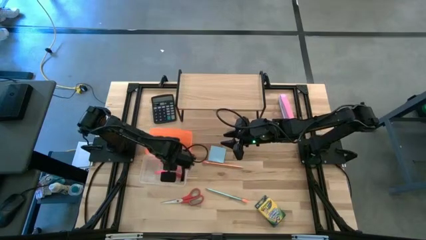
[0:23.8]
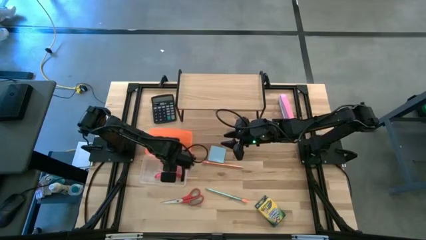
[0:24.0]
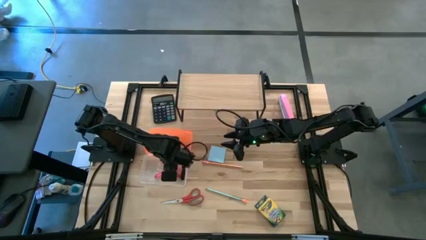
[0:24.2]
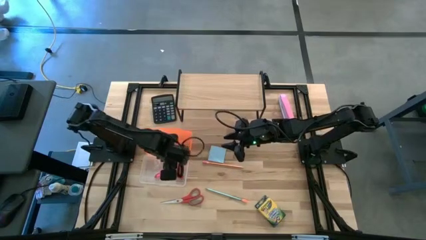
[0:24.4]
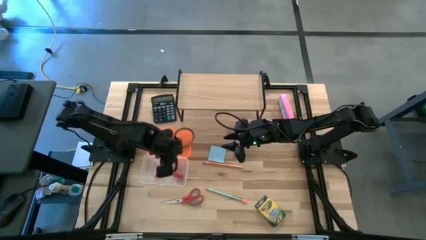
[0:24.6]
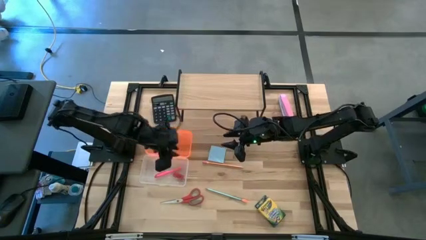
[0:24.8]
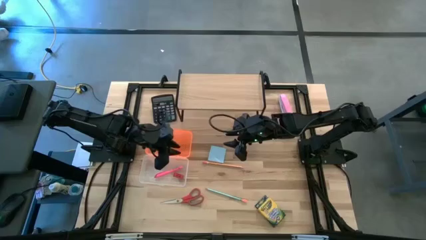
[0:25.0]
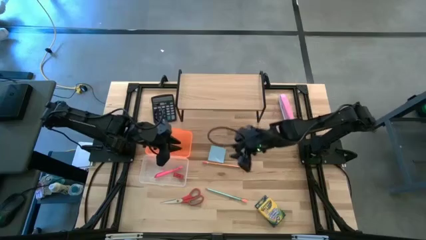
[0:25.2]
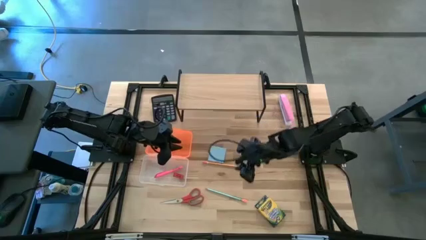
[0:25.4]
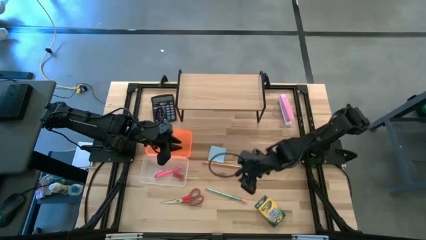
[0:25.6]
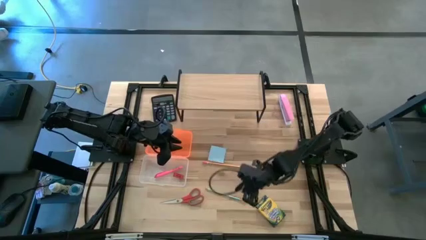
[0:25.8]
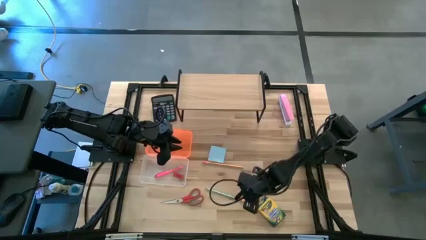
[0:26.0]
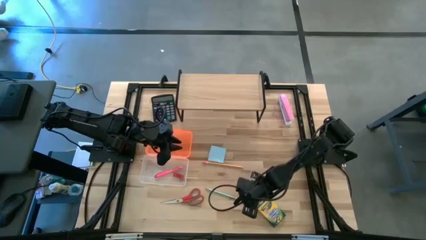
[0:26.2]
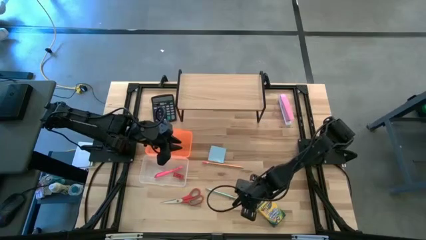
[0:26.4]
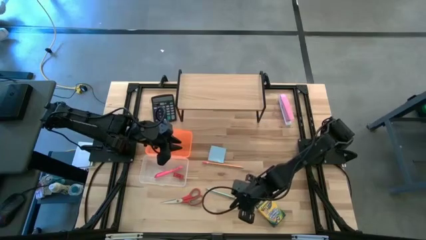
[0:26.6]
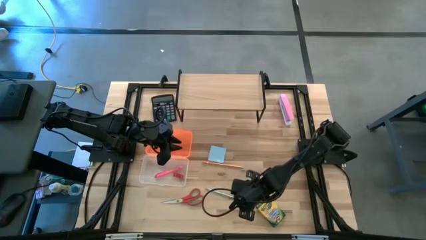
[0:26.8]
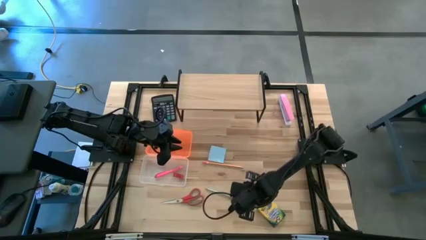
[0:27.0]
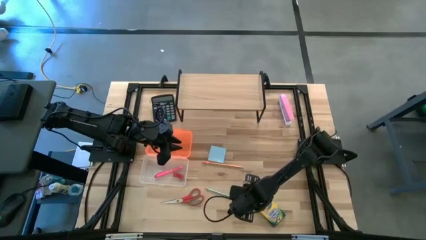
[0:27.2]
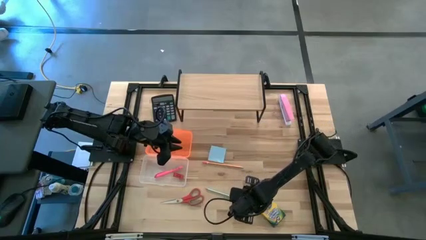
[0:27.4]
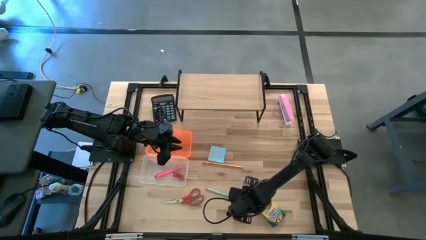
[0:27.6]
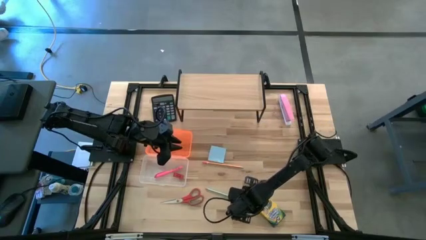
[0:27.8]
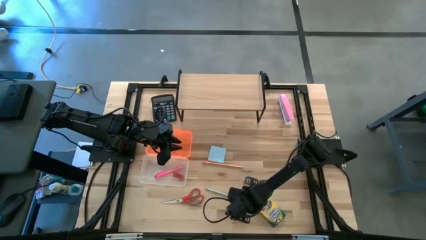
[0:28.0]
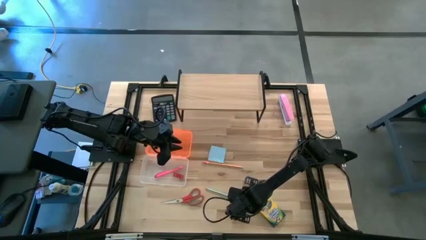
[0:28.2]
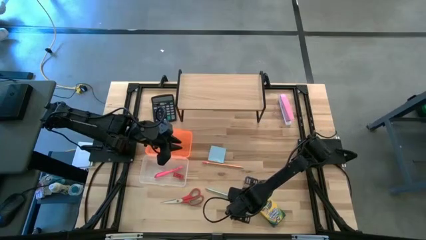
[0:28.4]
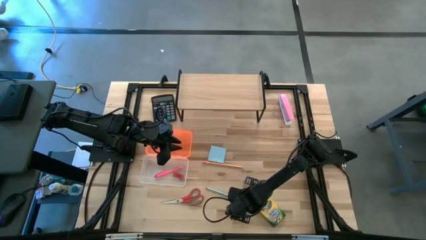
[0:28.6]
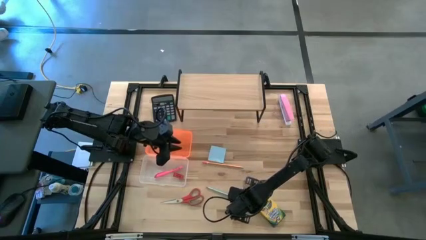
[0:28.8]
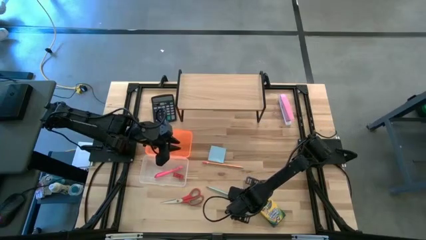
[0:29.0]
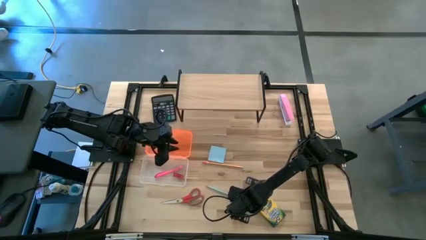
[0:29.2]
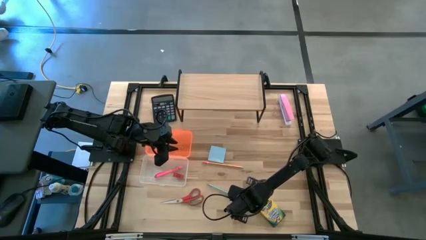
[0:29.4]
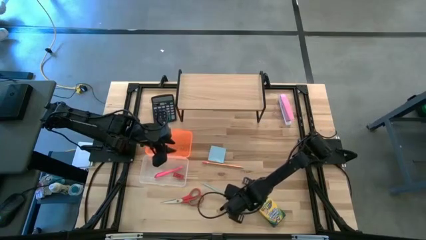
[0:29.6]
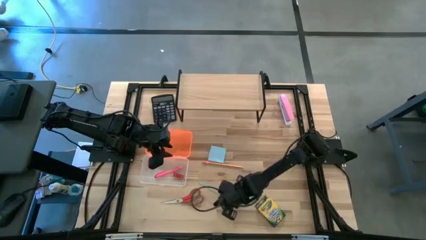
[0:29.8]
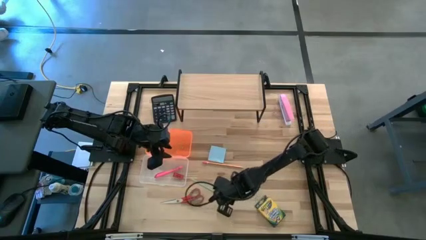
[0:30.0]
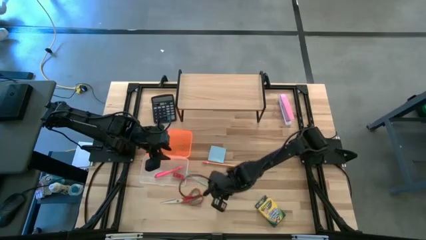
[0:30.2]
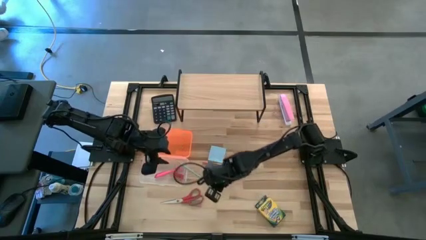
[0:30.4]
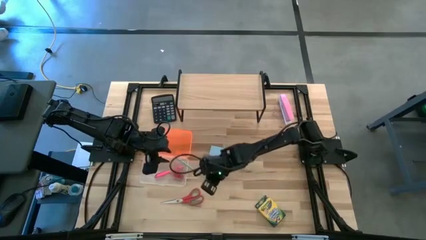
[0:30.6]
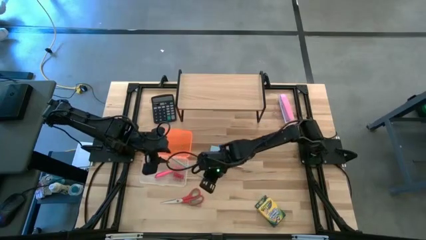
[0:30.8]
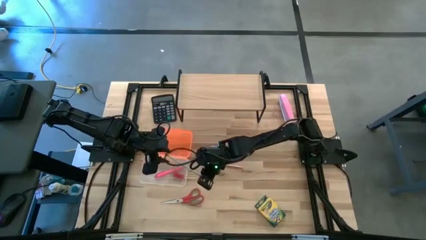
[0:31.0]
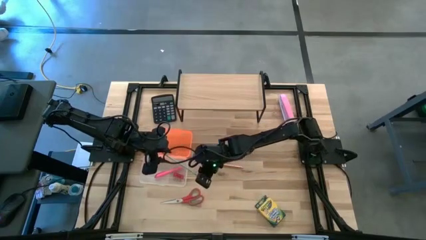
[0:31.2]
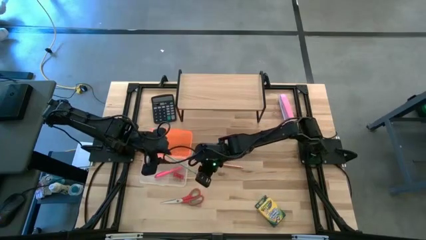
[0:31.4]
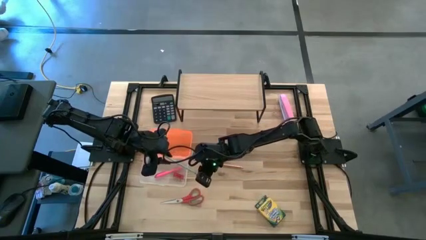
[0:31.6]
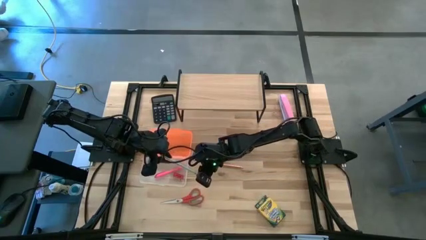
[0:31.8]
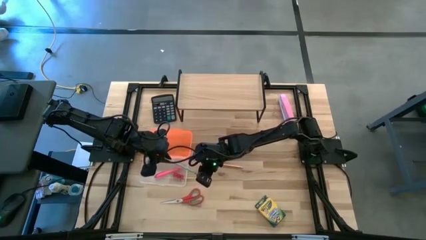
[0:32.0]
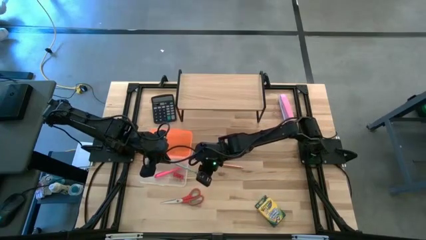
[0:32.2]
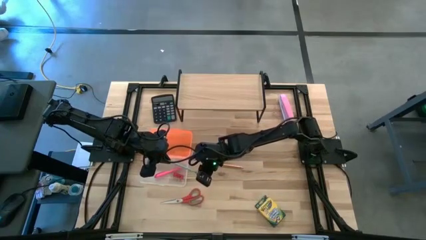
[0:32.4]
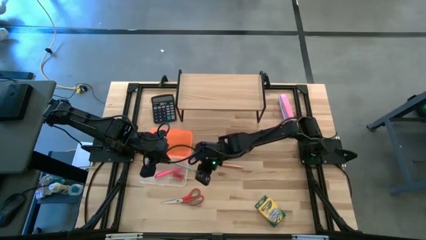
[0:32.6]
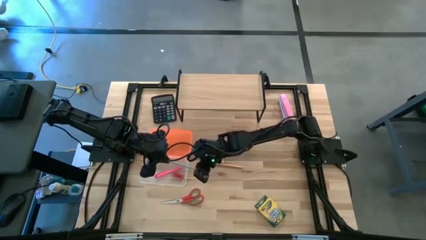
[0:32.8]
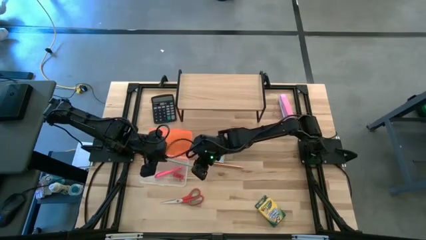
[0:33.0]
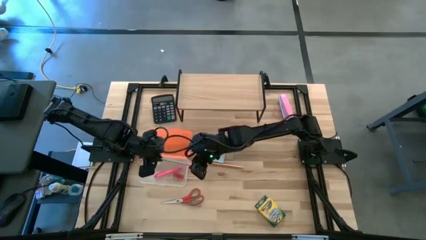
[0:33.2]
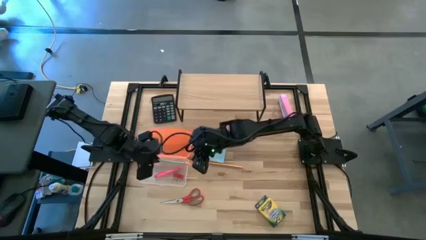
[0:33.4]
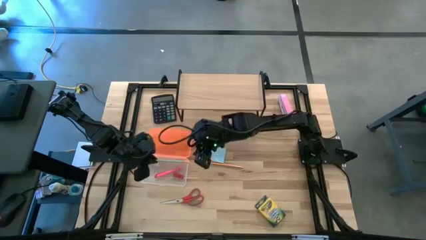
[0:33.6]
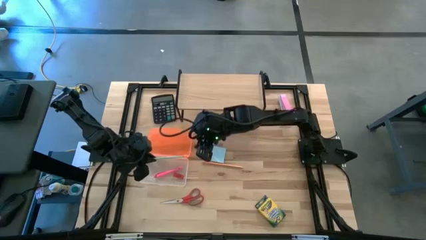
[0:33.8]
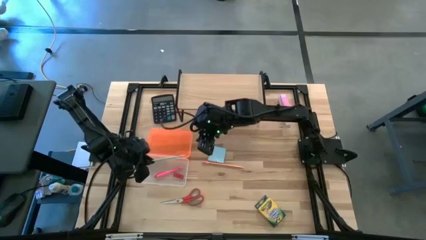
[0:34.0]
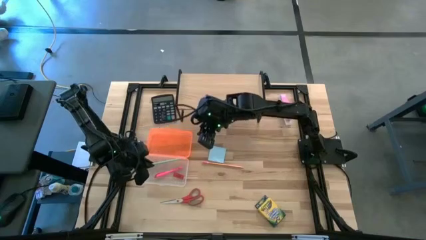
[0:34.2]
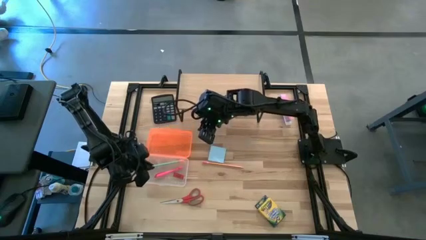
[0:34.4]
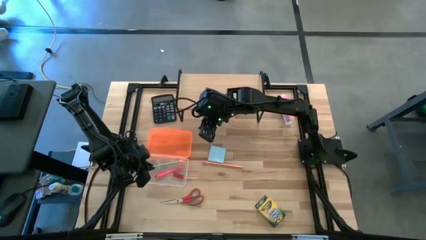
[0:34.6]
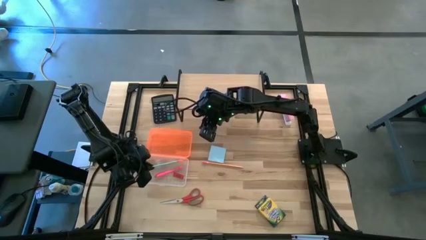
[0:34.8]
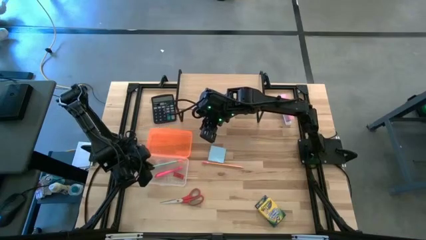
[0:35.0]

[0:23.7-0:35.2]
Task: Pack school essentials
Put the blue pencil into the supply box

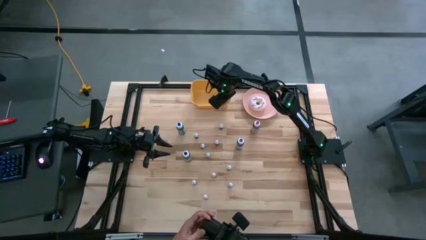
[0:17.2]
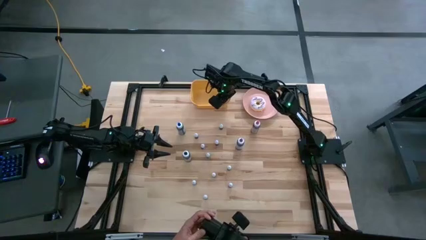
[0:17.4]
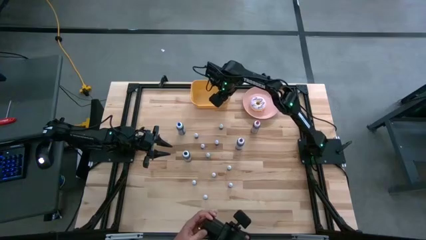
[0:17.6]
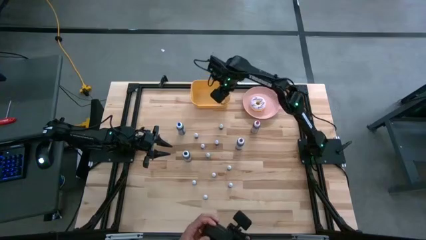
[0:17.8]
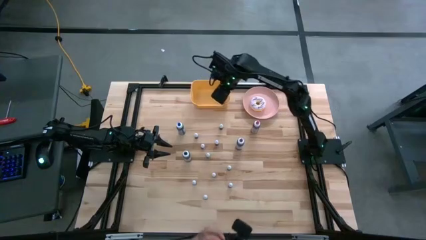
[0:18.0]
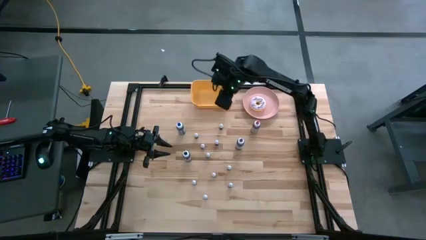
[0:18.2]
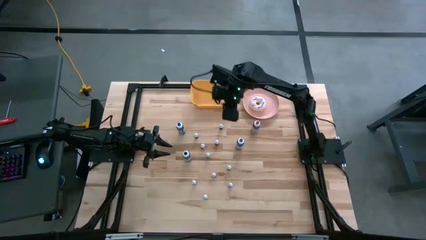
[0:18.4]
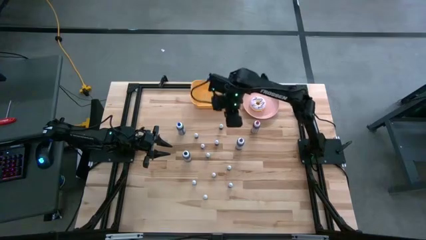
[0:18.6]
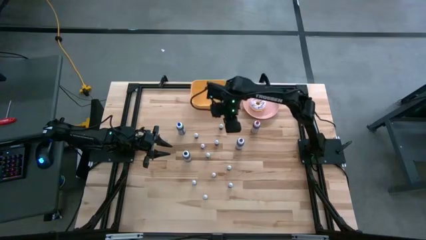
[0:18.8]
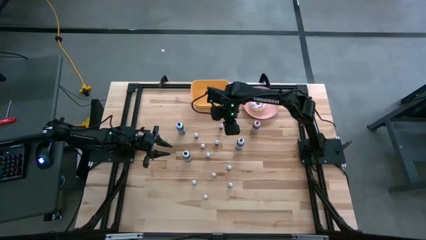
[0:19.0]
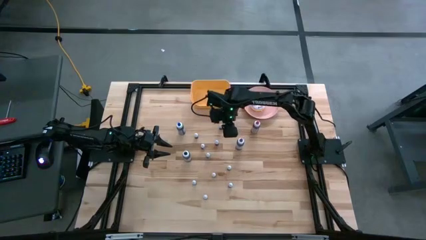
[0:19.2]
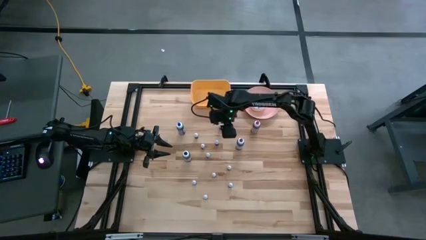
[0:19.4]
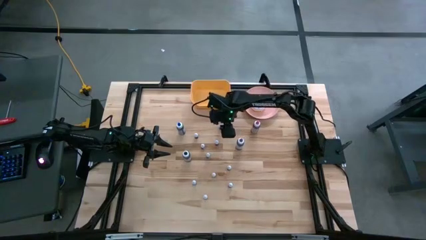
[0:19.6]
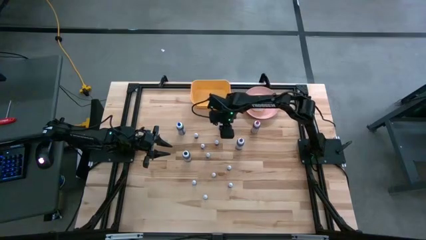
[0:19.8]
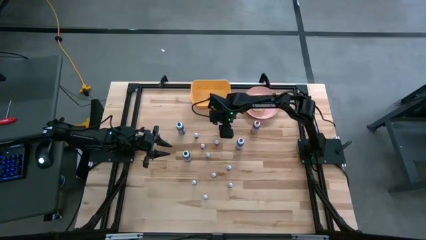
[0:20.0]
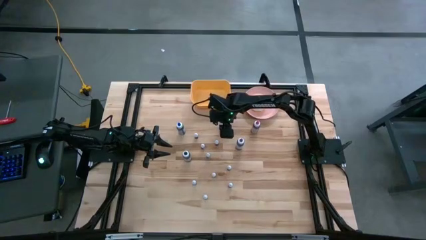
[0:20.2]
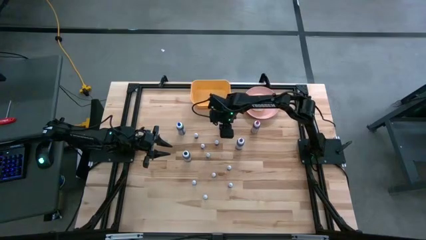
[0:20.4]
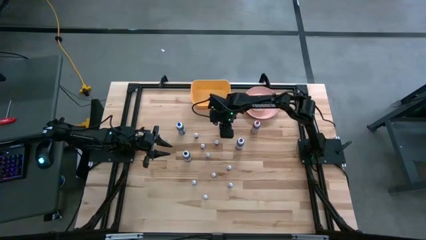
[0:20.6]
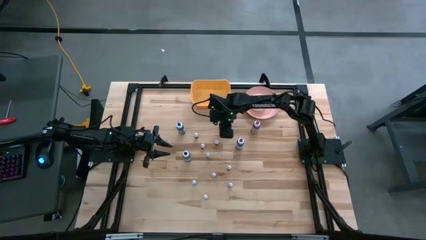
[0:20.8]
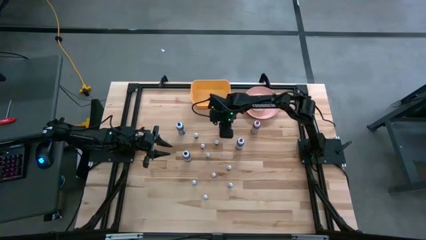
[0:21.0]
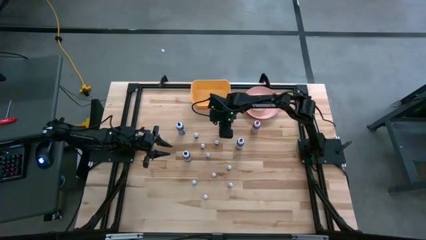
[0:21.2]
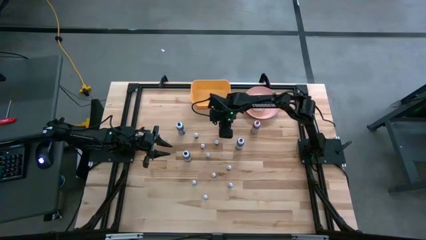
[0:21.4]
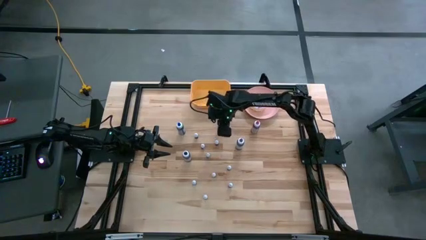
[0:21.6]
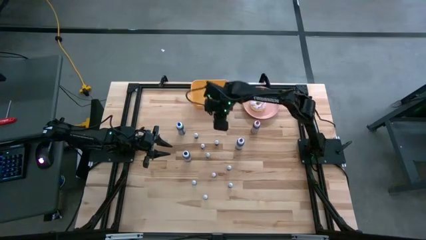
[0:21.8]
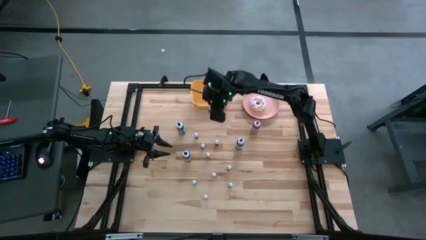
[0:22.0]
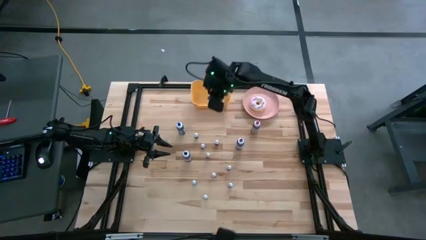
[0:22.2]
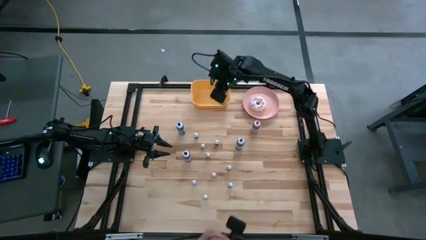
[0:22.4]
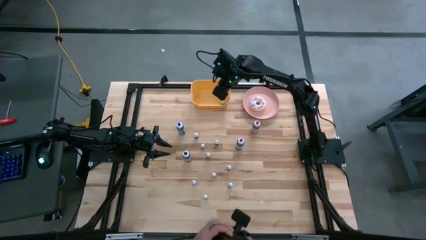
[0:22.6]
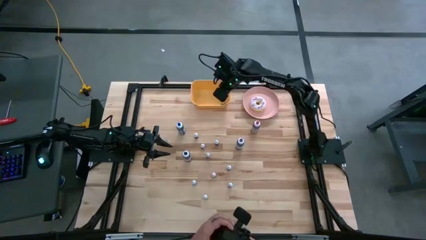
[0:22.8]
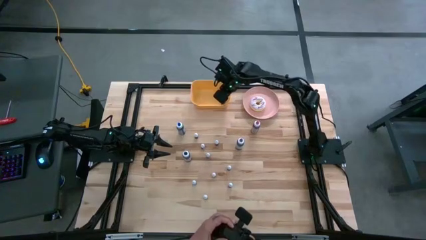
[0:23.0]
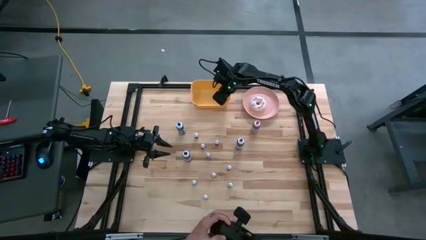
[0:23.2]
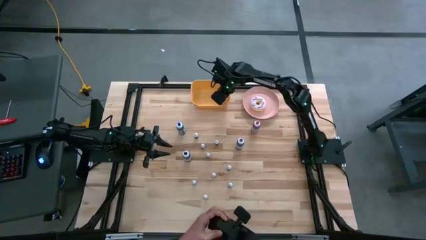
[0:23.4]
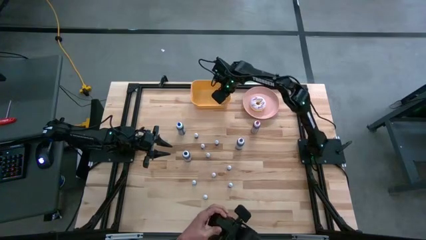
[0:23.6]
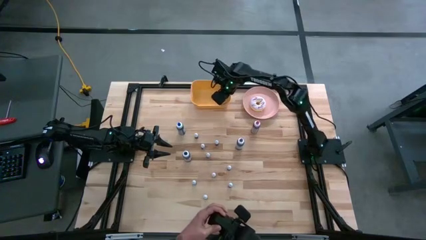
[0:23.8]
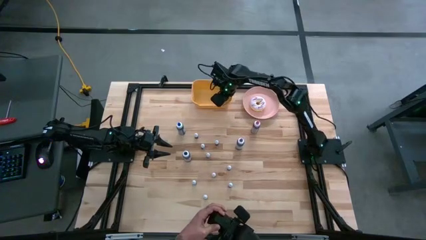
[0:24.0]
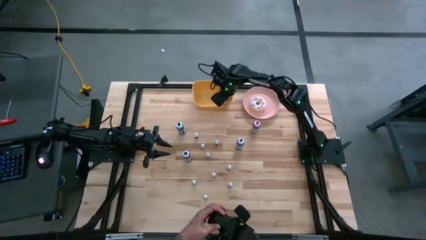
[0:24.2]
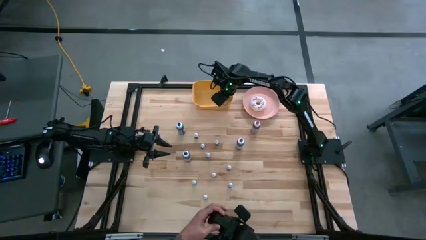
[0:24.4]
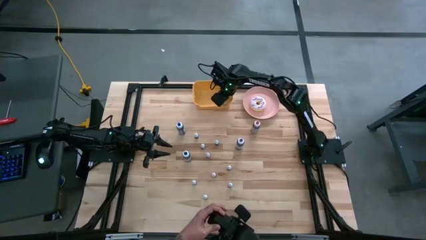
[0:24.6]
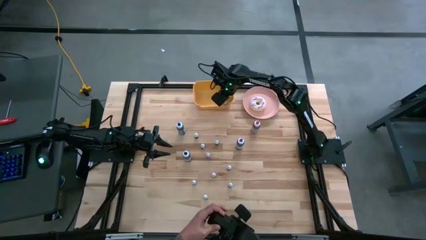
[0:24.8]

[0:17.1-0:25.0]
Task: Pick & Place food coloring
Put the small black food coloring bottle into the yellow bin
